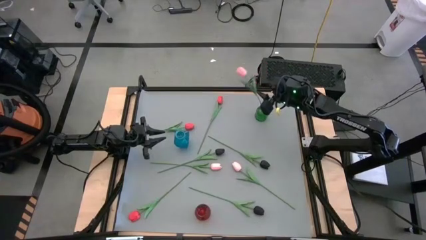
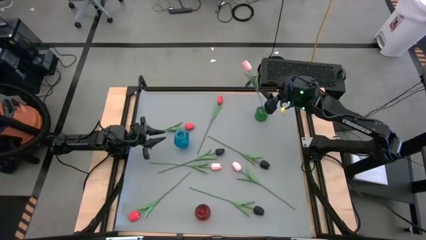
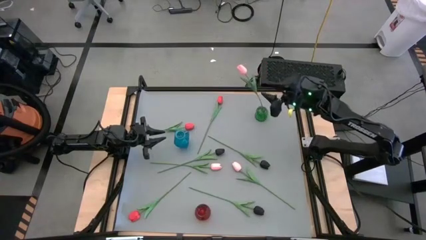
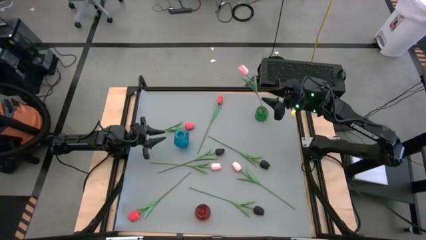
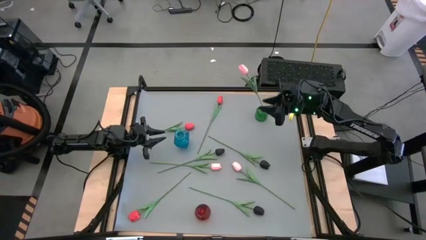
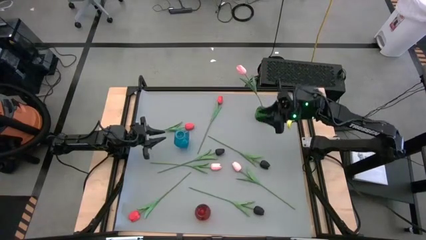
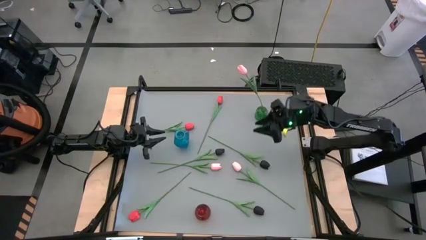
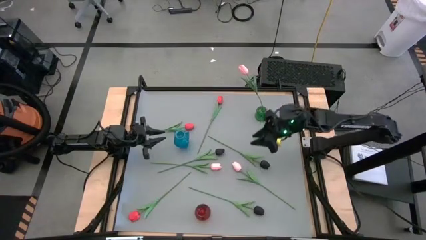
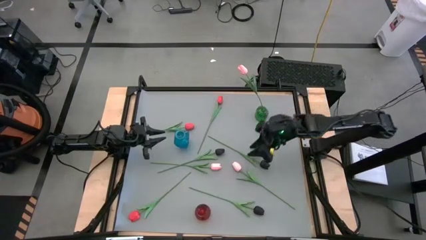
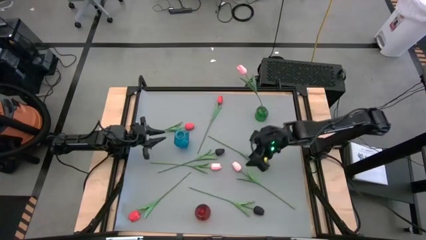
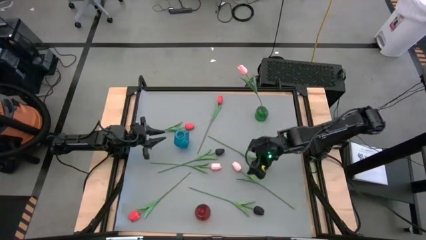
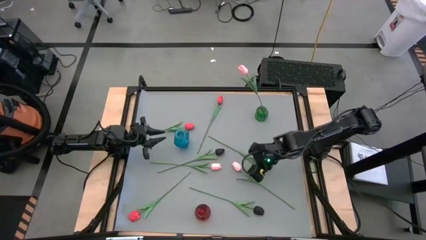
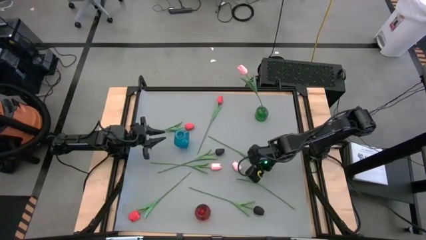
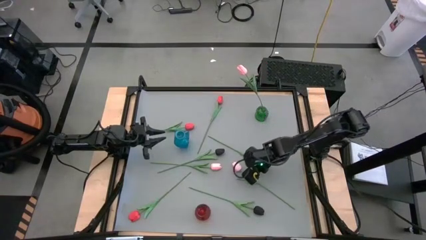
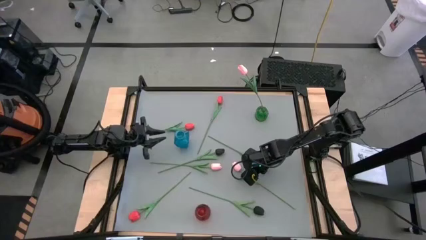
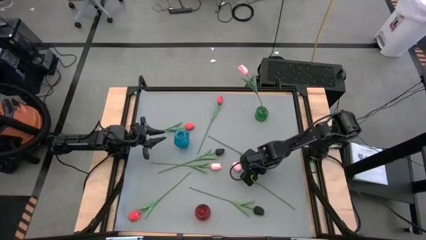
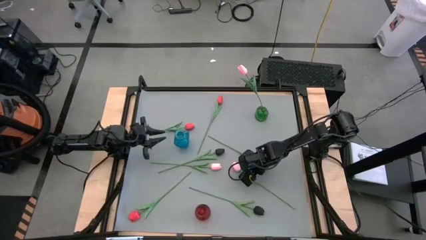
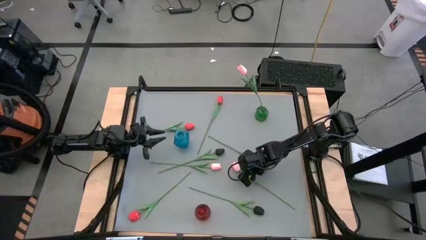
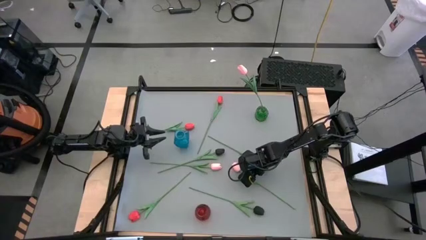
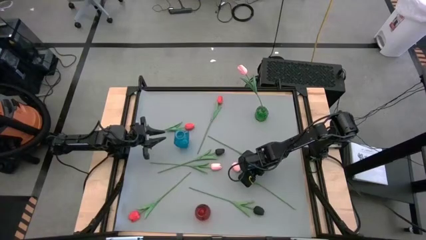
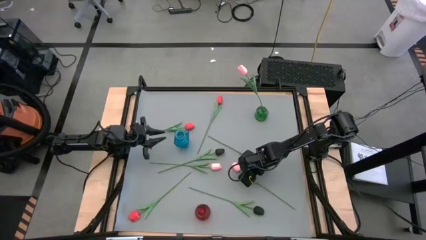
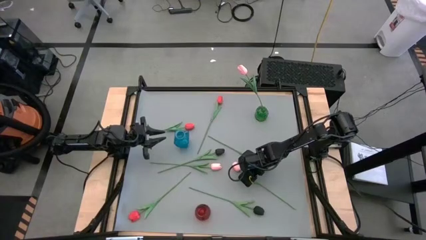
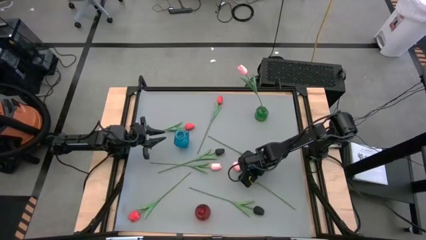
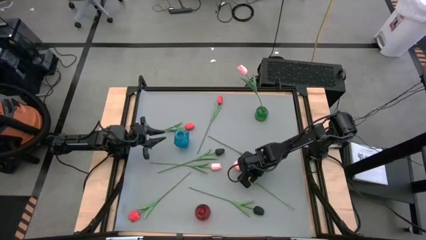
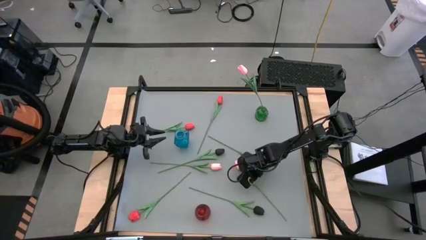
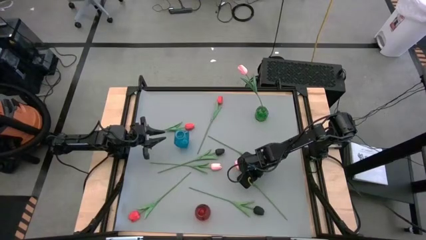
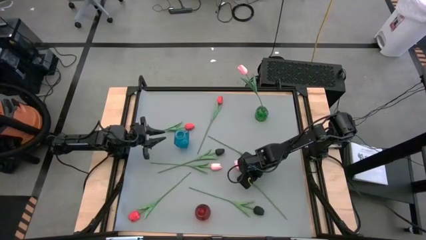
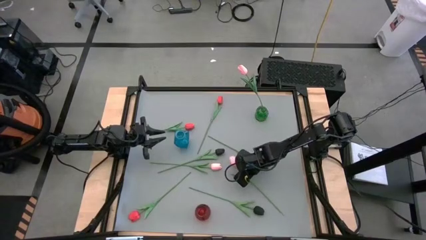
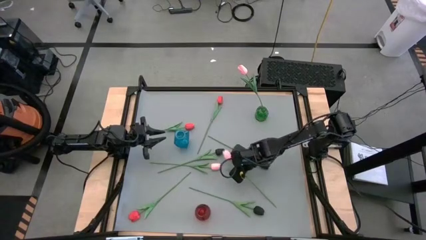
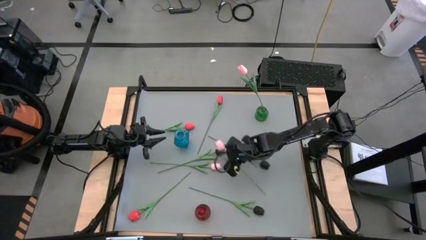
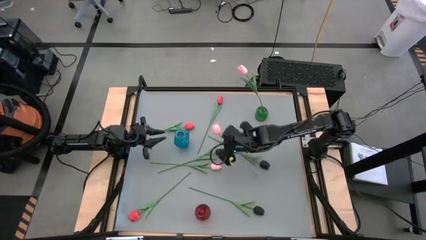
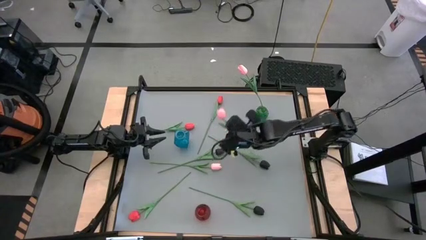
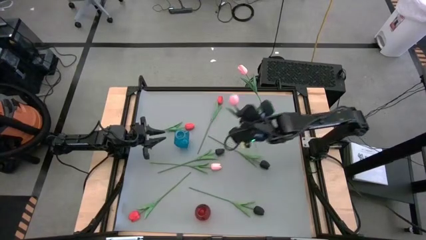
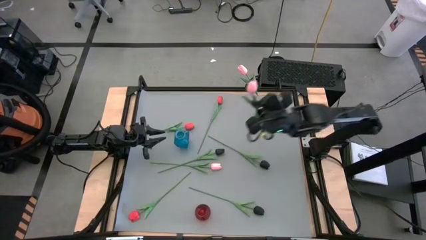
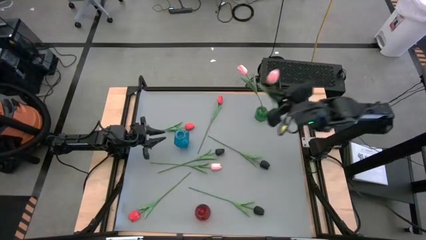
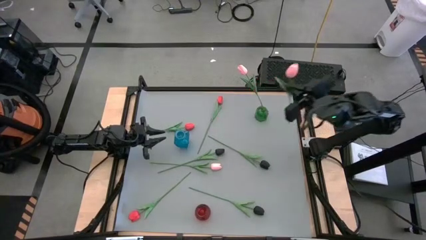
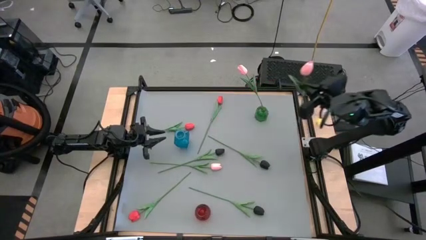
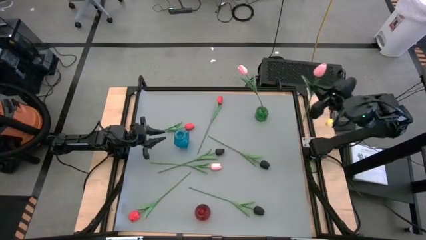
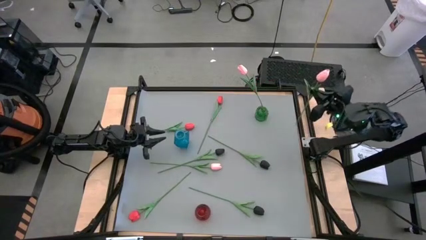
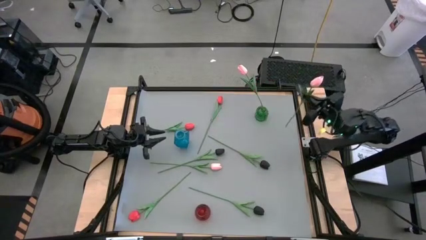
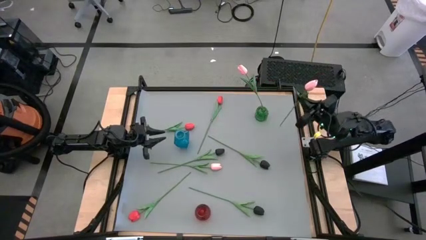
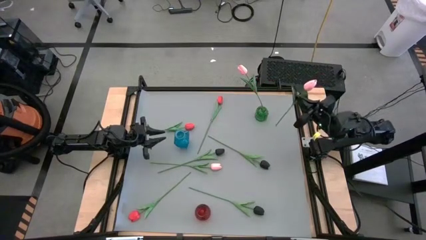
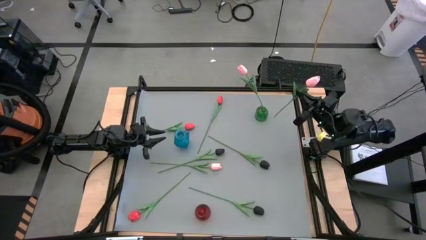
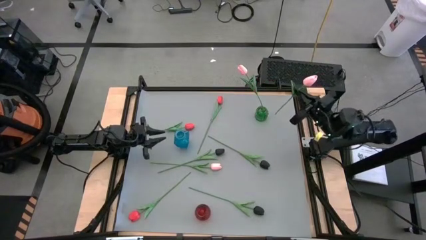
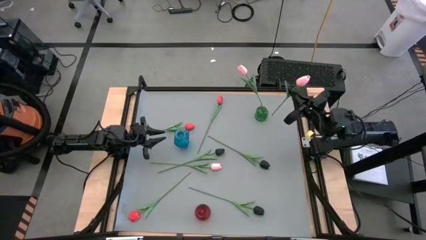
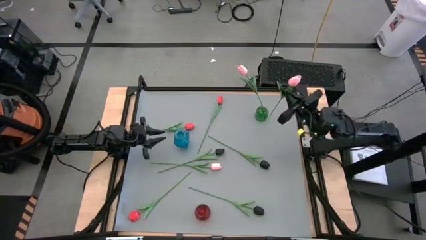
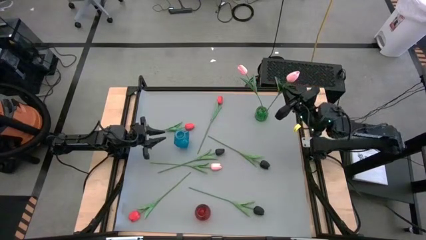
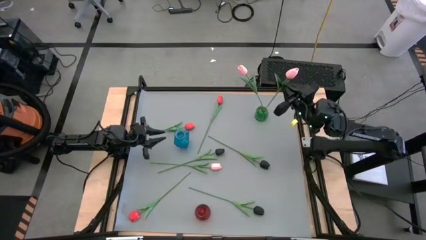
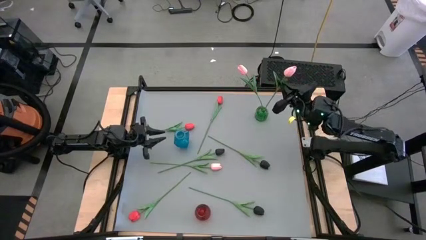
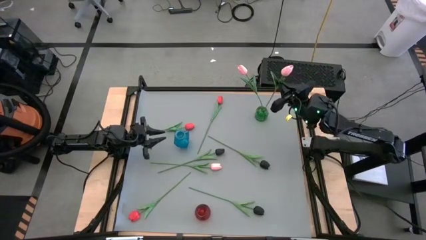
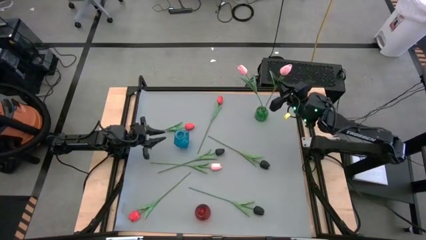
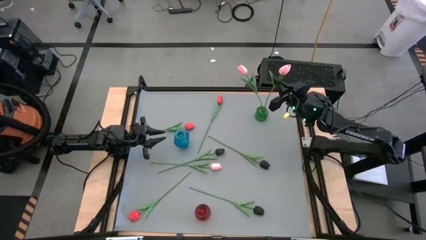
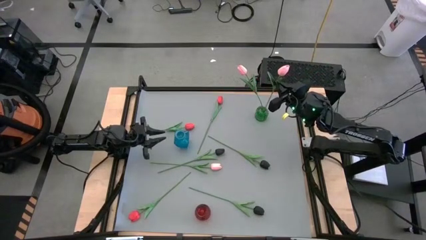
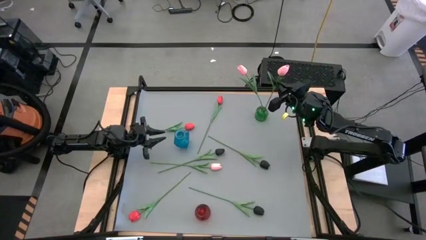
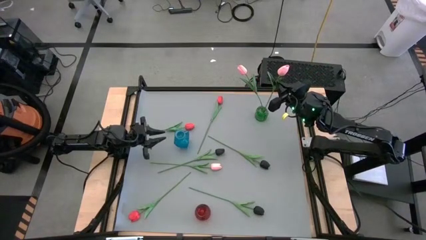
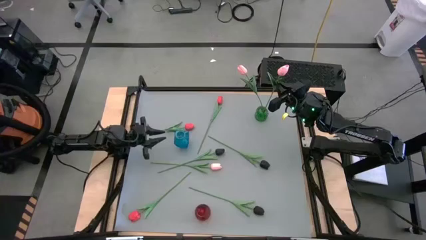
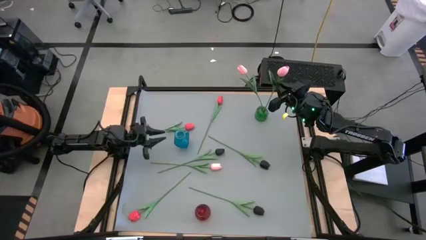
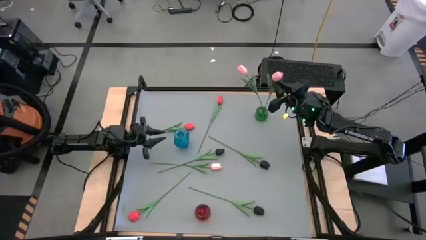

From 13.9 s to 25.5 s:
Task: Sort flowers into vase by color
Put the right pink flower into the green vase
